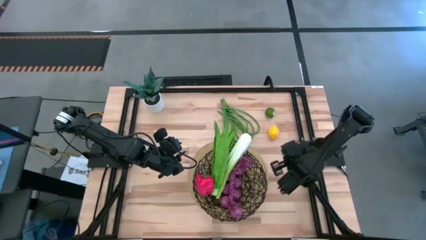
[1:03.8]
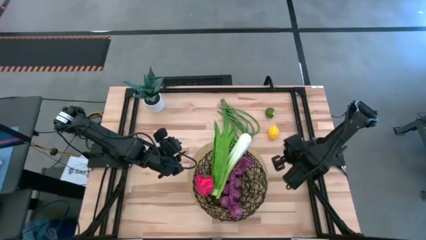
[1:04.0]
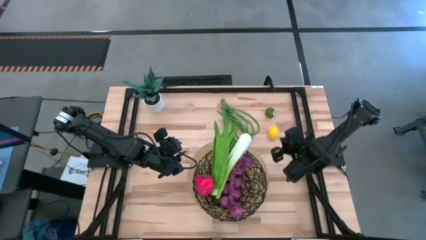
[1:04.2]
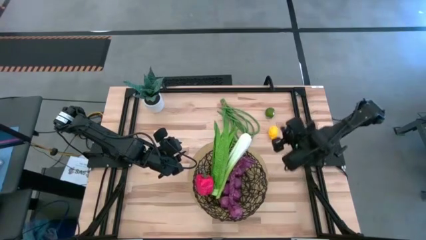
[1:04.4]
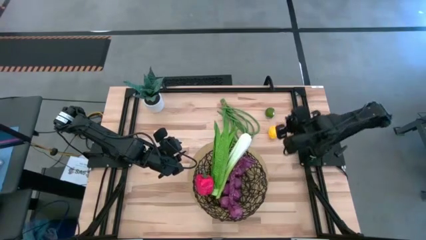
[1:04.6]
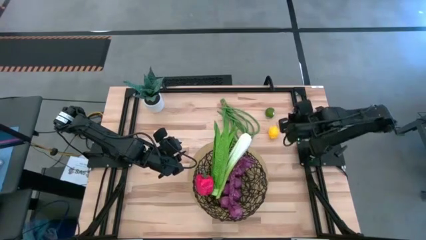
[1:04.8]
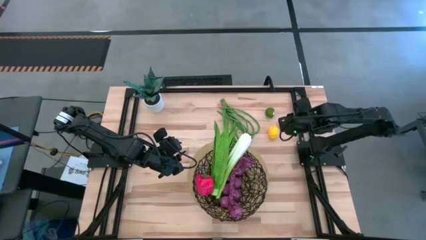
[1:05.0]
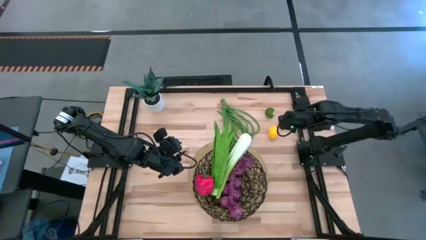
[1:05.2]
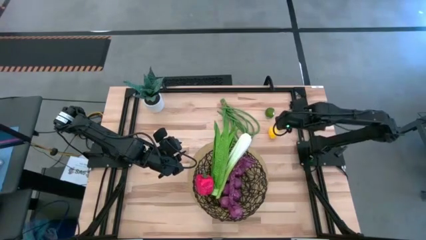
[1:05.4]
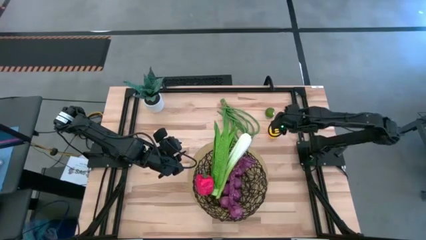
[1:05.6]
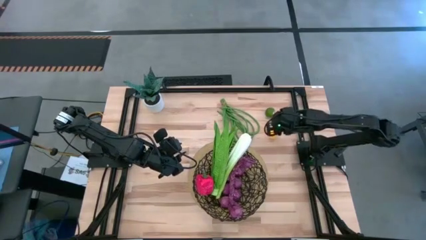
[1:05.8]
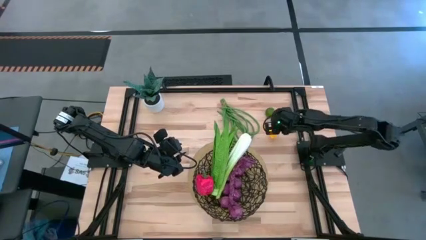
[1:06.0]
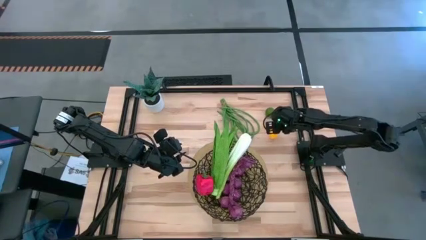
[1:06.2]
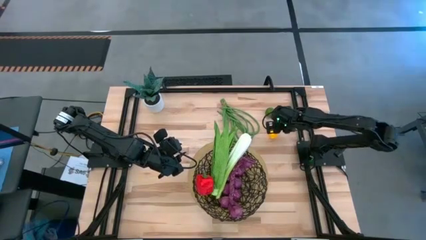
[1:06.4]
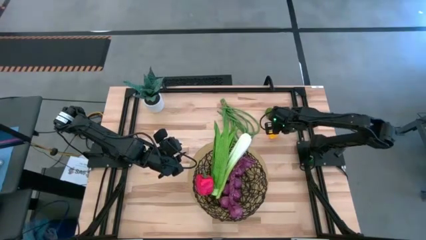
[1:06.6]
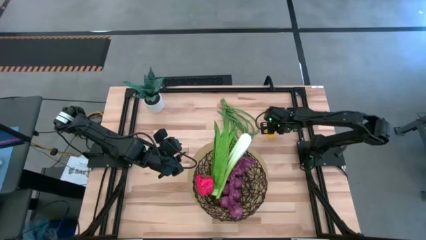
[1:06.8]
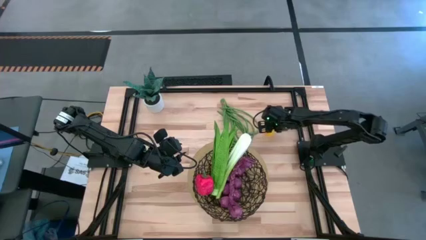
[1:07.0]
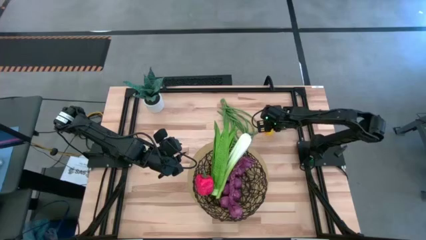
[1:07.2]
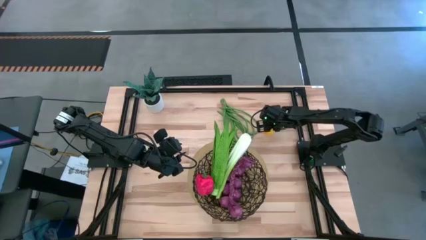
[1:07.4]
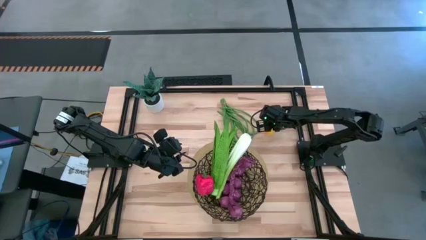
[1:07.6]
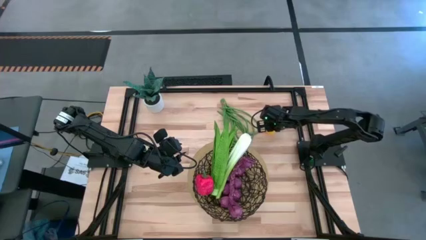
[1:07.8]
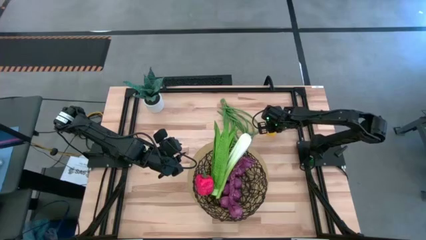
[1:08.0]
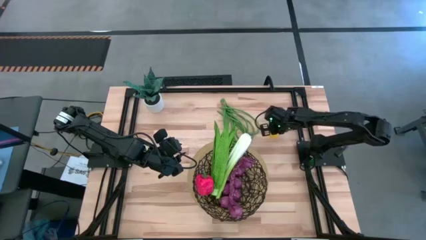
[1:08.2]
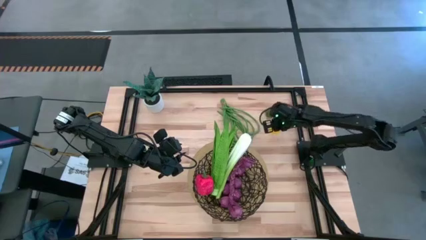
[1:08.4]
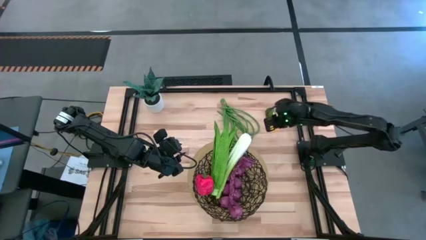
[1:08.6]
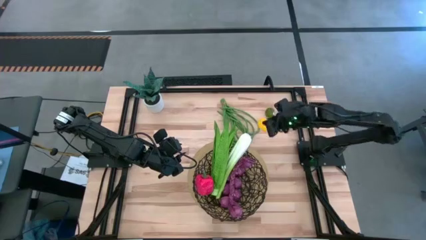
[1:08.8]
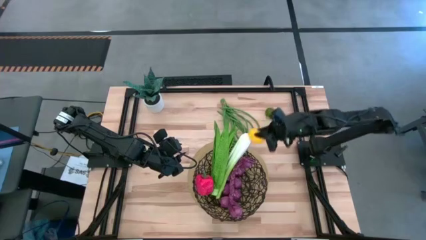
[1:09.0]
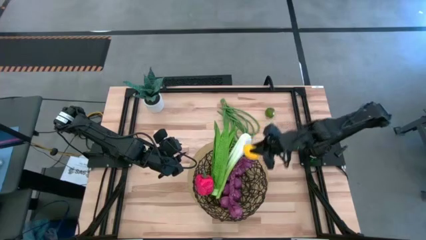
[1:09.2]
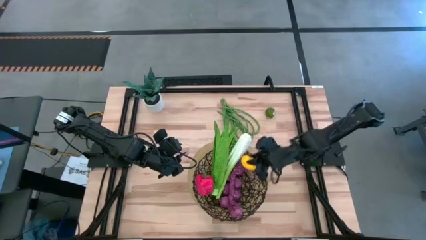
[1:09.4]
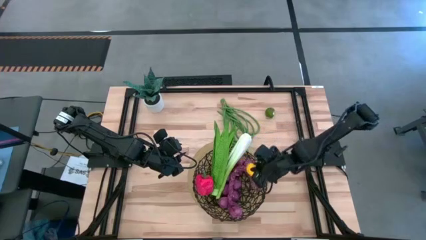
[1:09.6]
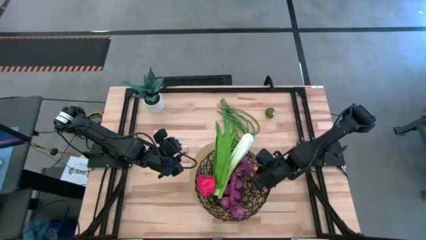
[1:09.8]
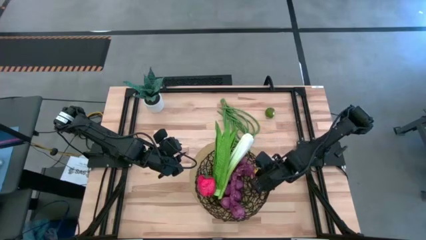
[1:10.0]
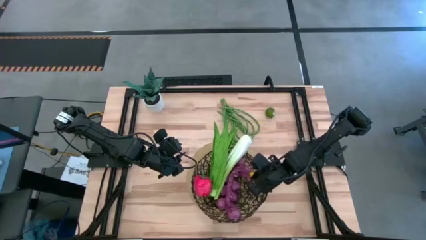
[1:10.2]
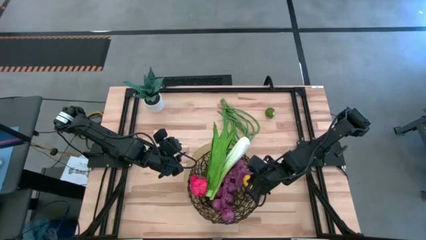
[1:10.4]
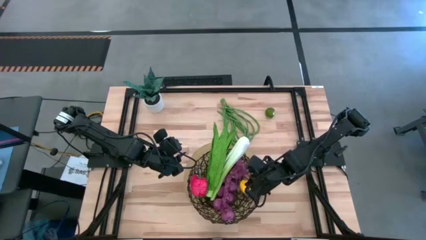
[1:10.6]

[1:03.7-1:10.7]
Task: Build produce basket
Put the yellow lemon into the black basket

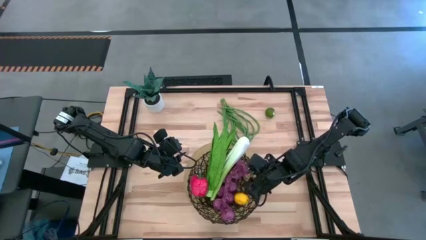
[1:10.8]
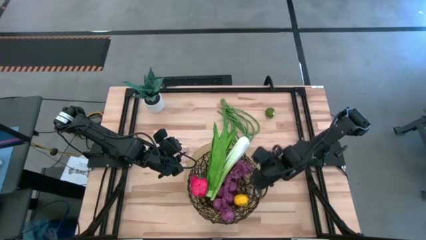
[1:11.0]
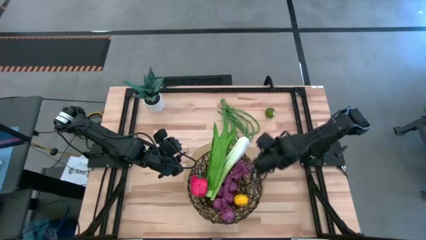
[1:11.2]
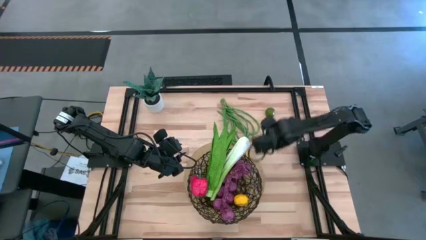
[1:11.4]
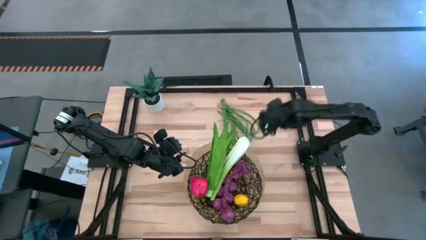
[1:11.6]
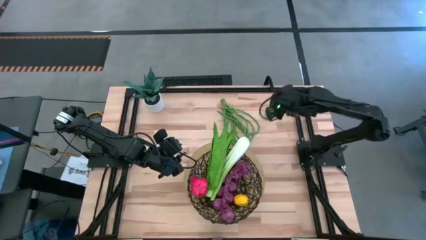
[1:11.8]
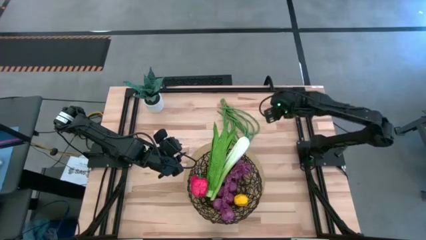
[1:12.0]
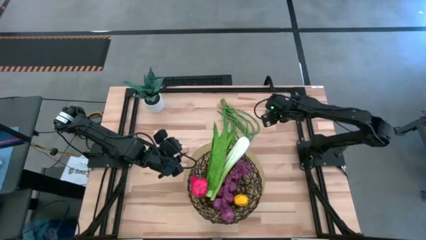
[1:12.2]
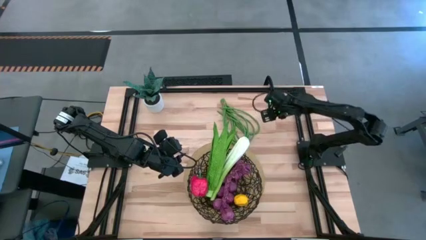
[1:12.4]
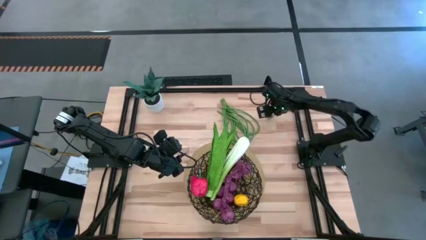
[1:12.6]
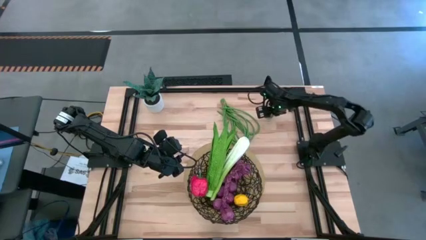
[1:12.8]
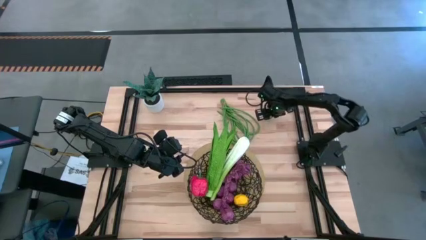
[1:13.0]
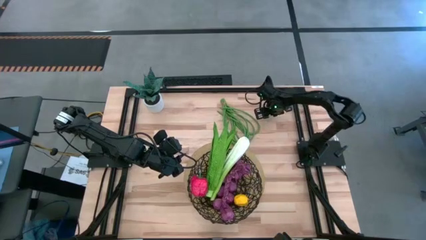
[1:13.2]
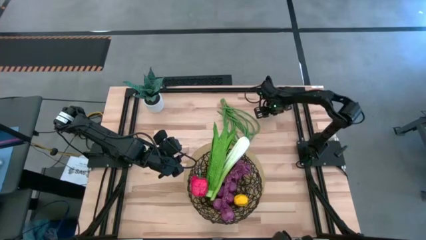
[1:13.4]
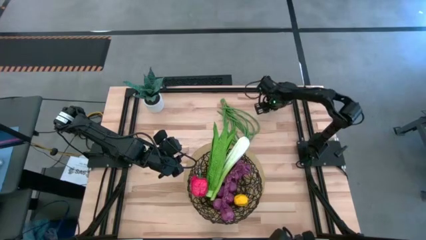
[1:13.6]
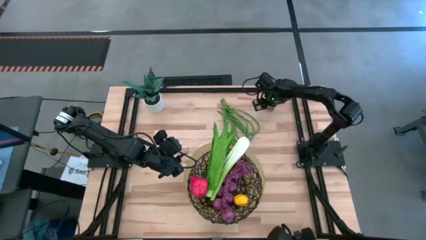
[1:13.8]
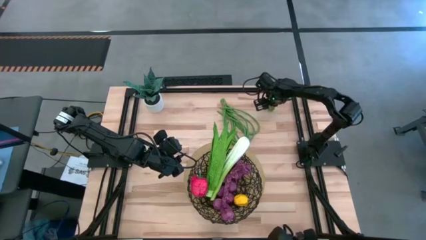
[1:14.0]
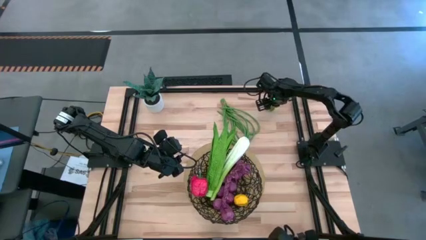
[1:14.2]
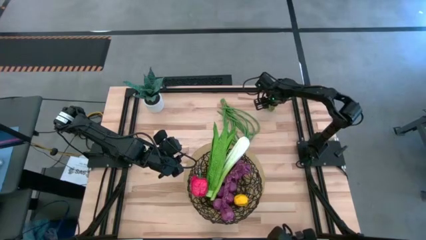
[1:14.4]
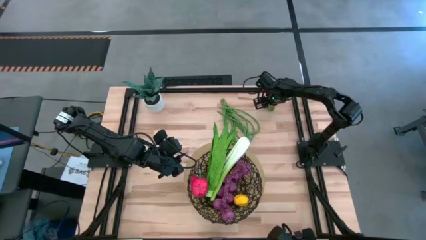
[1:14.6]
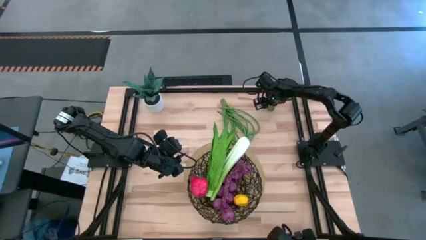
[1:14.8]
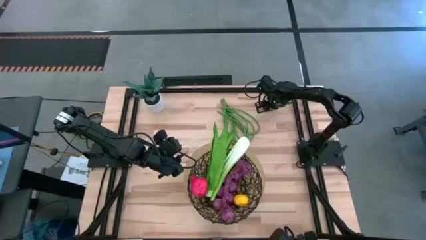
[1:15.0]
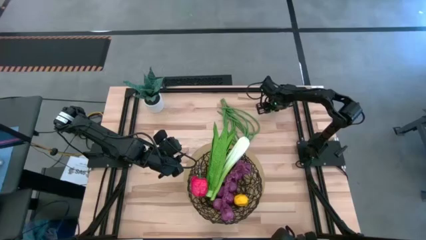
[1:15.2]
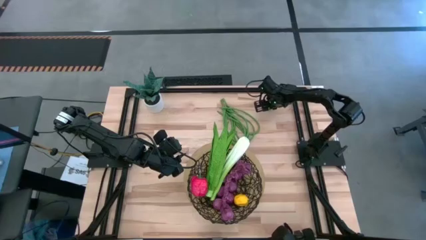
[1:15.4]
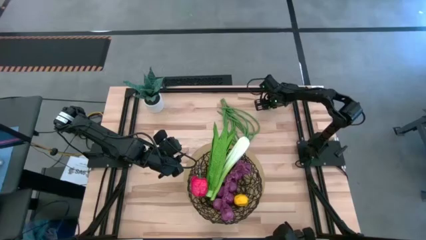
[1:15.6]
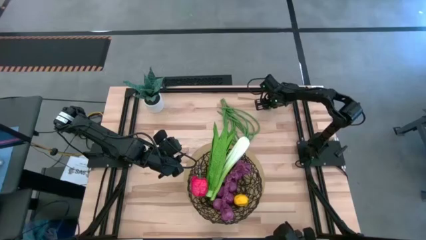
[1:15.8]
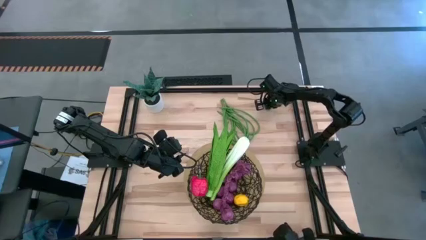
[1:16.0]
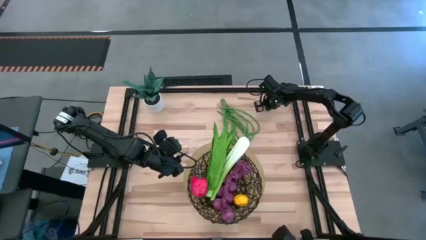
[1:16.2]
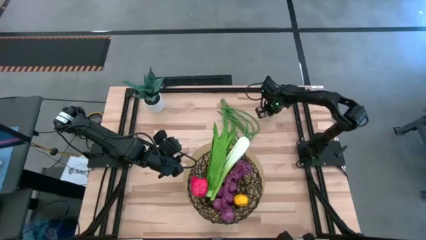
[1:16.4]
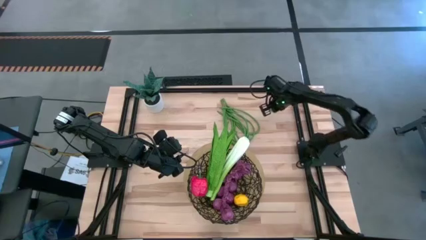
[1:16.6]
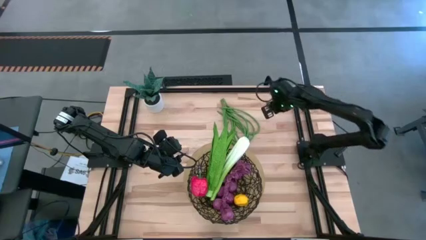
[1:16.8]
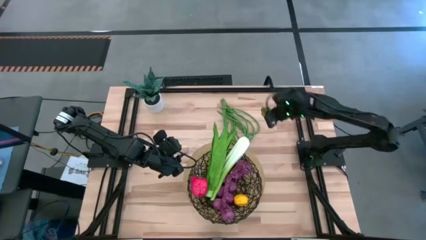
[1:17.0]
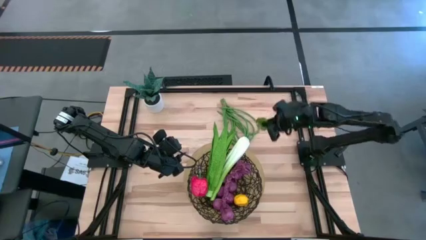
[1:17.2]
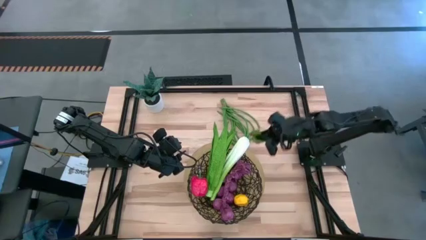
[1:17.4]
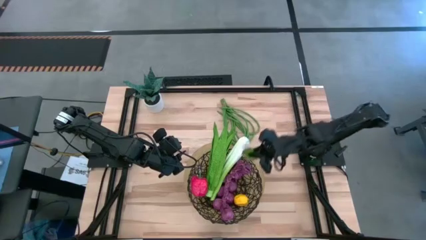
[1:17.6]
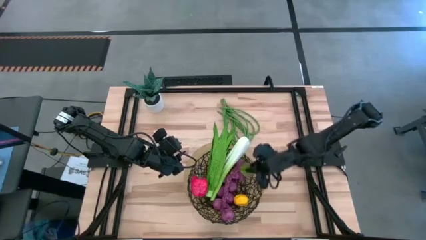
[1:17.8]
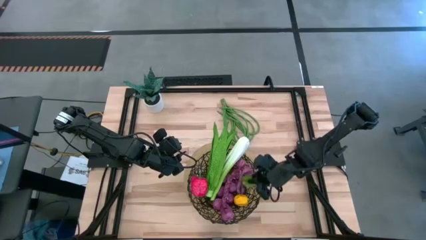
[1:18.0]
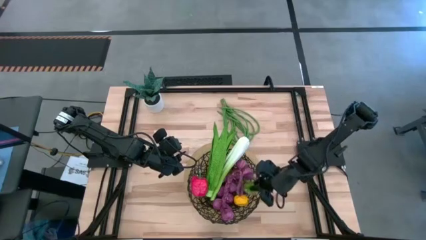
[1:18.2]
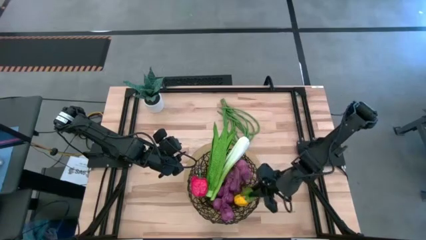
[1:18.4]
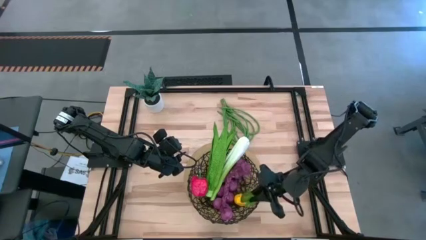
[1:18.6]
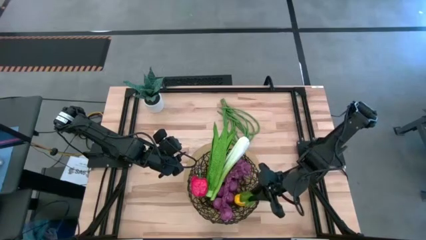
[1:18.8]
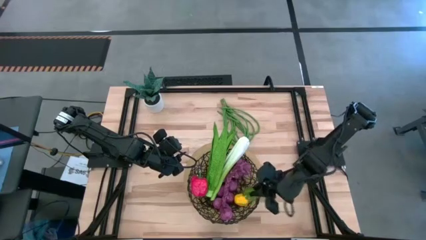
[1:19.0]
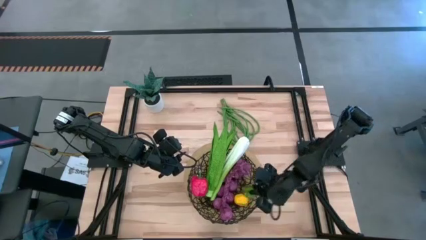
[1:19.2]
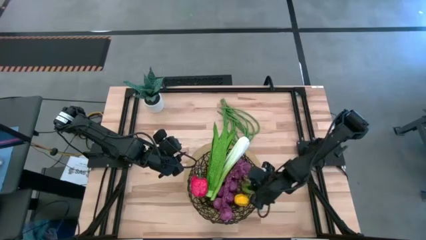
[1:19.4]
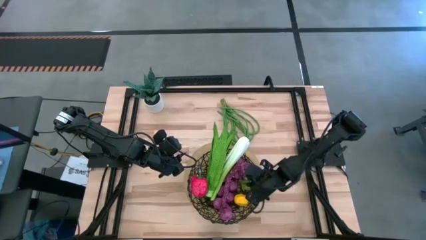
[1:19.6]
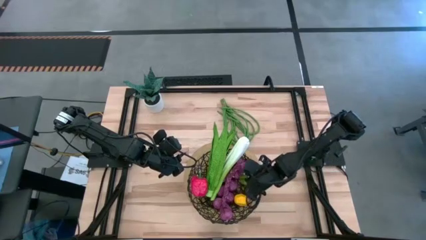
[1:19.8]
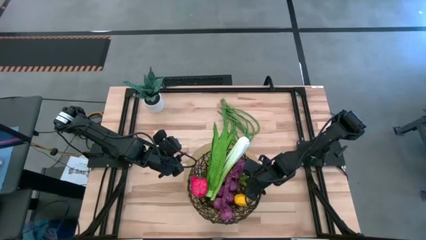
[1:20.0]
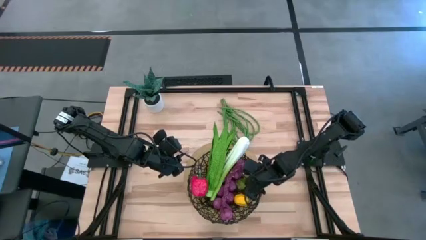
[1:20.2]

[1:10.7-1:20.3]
Put the green lime into the black basket
